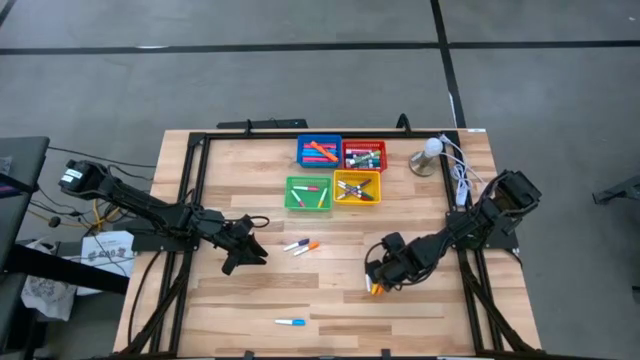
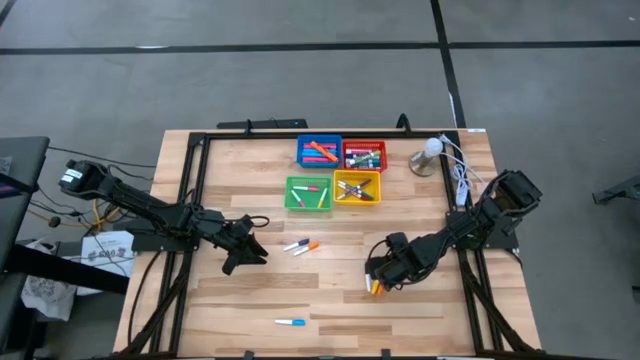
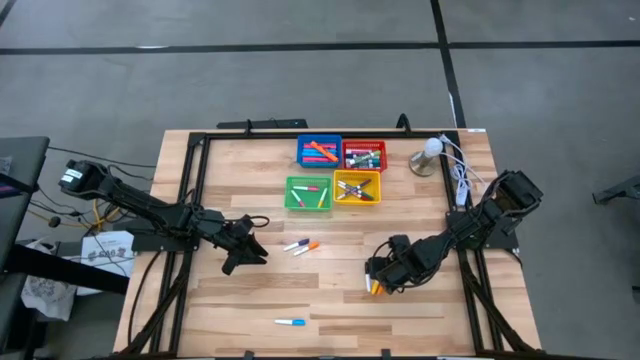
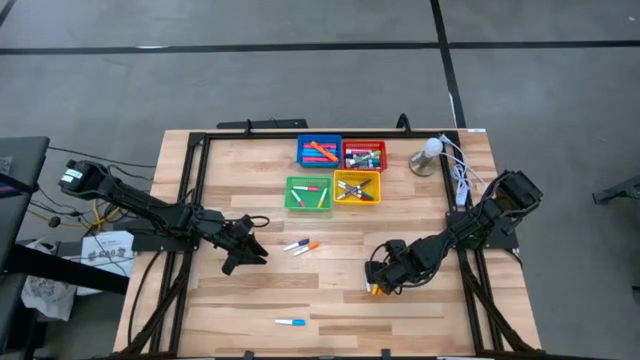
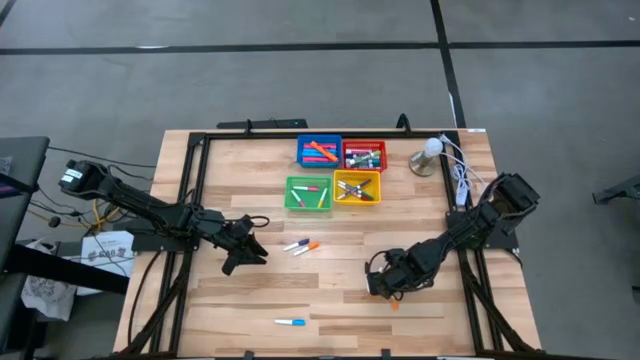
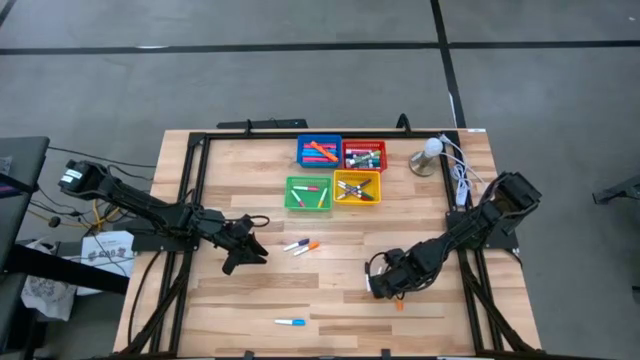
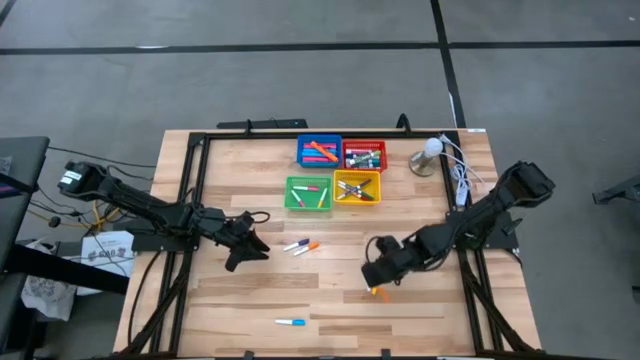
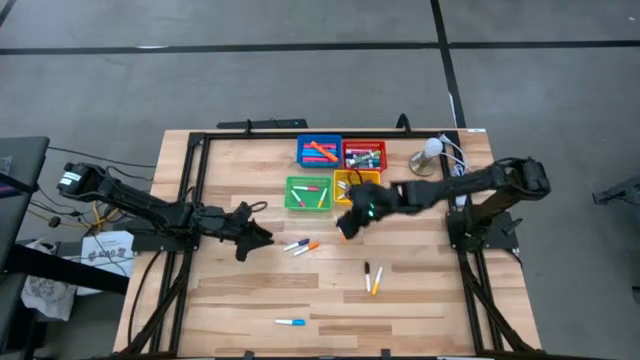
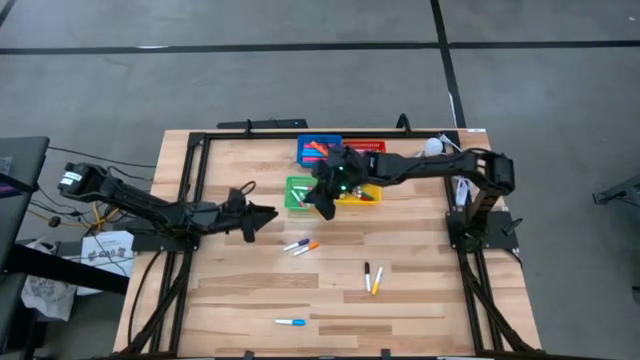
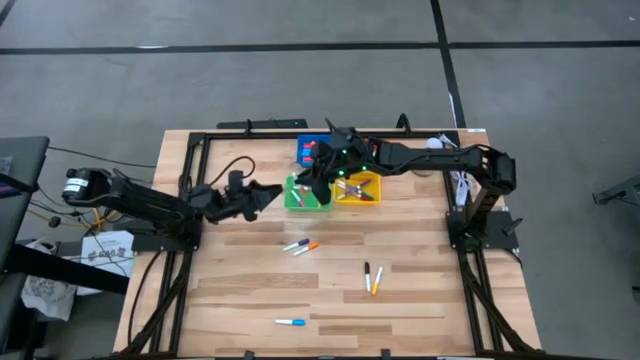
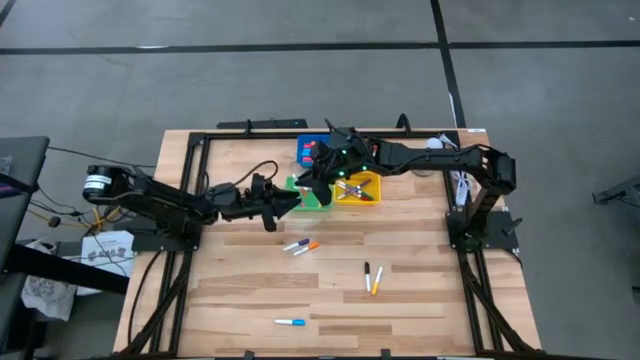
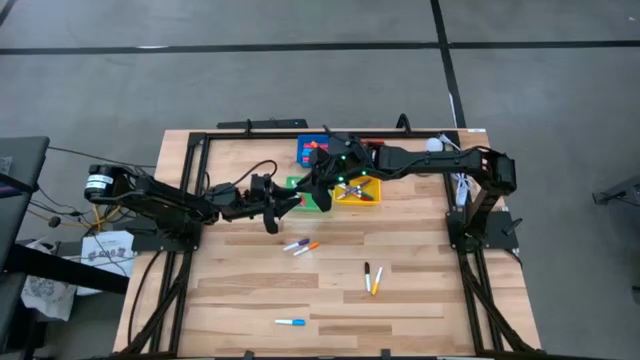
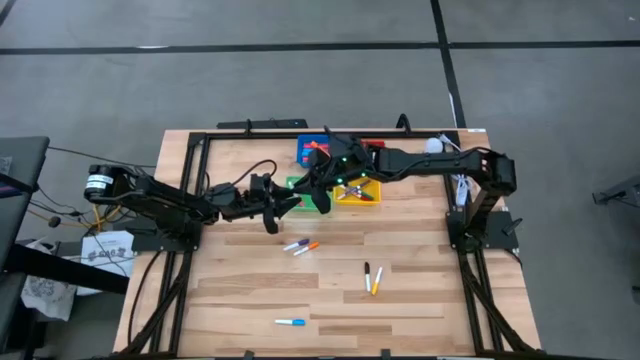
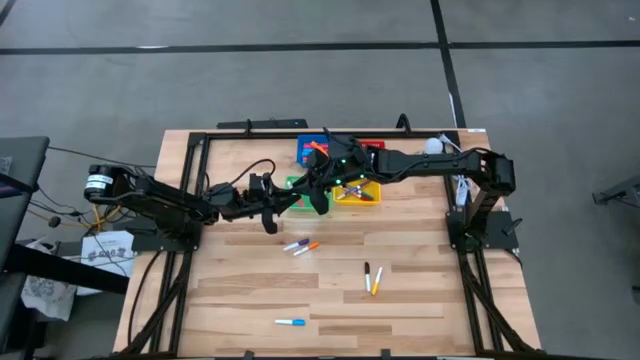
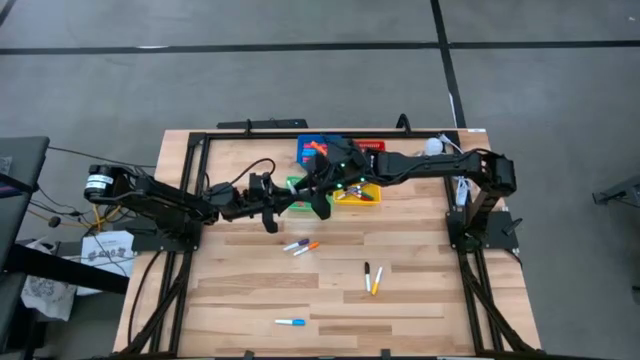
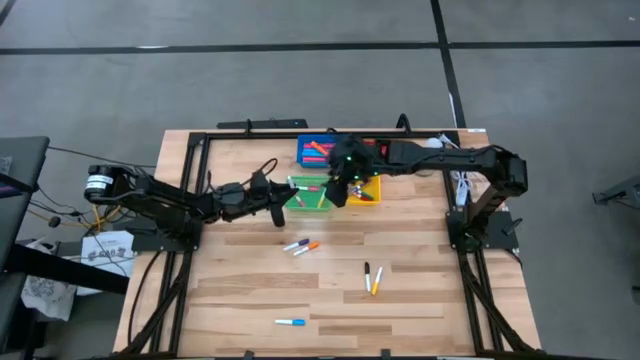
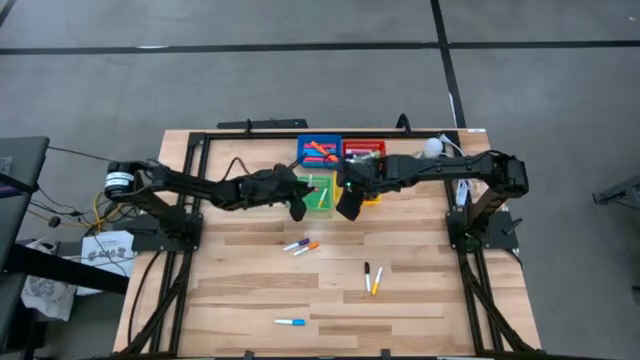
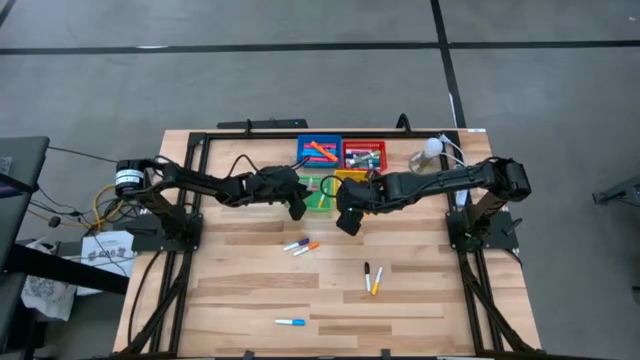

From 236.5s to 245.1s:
Task: Pick & Place Markers
Put the orange mini marker into the green bin

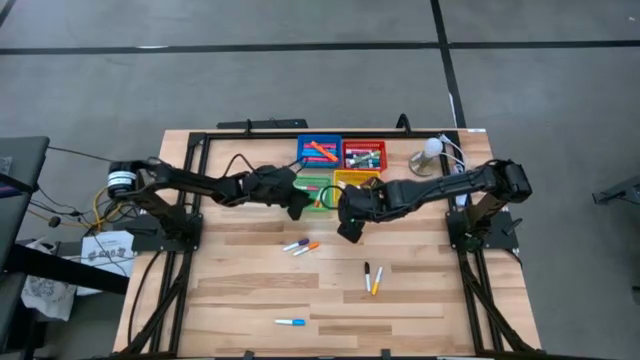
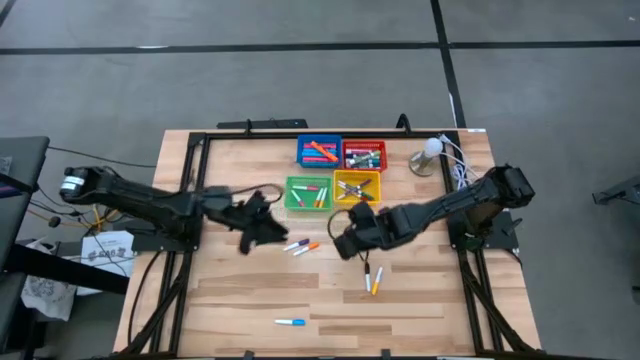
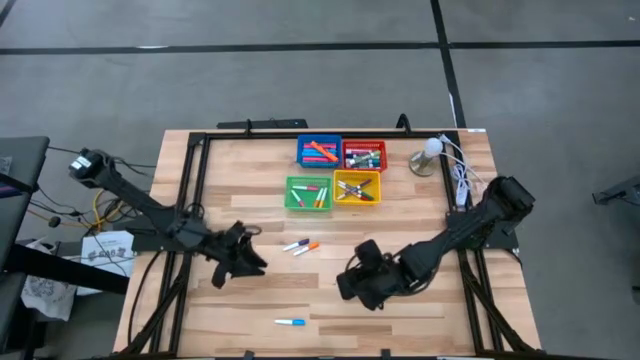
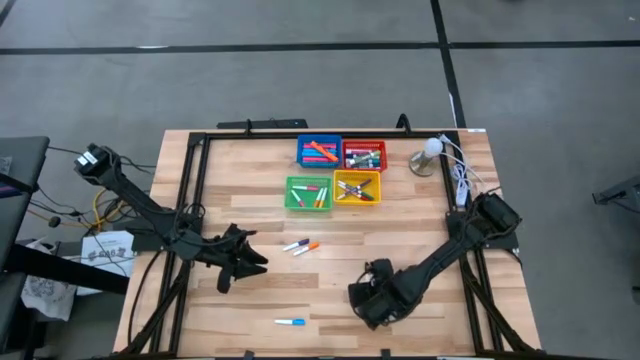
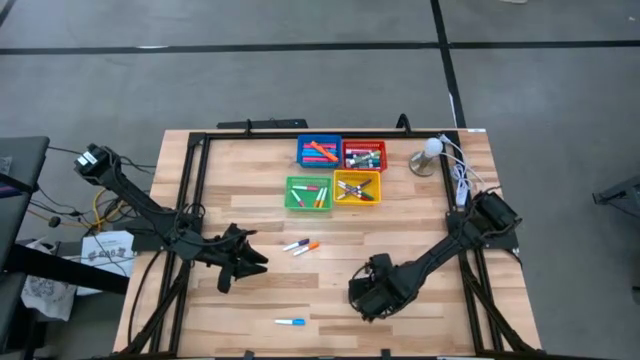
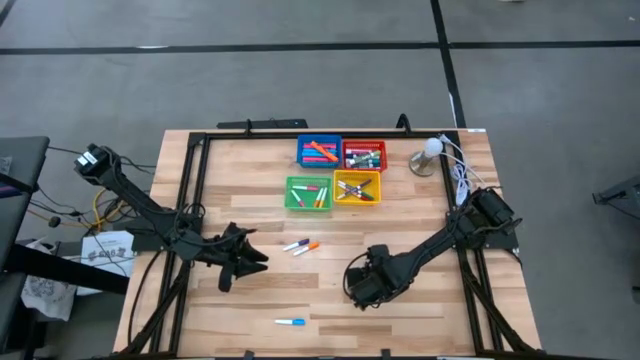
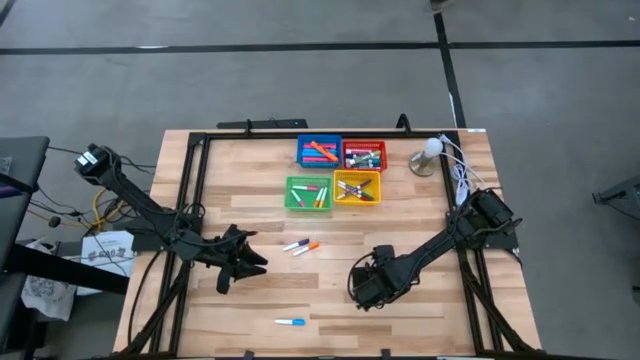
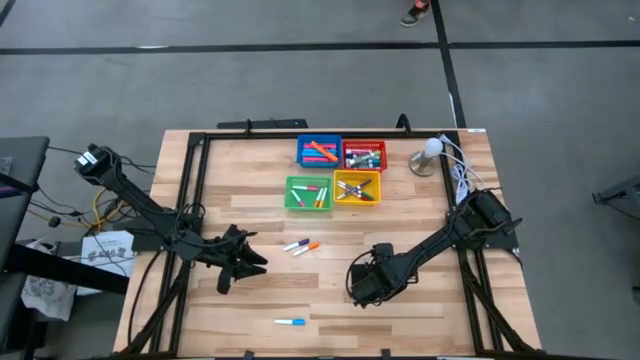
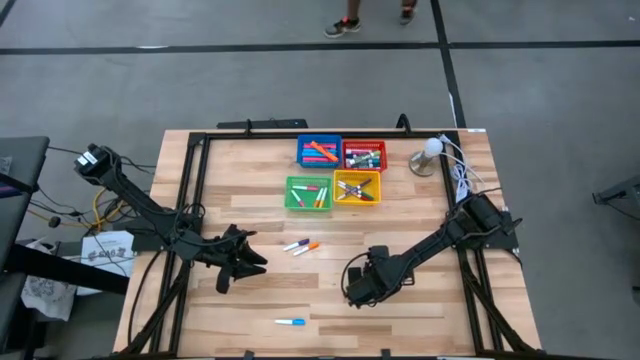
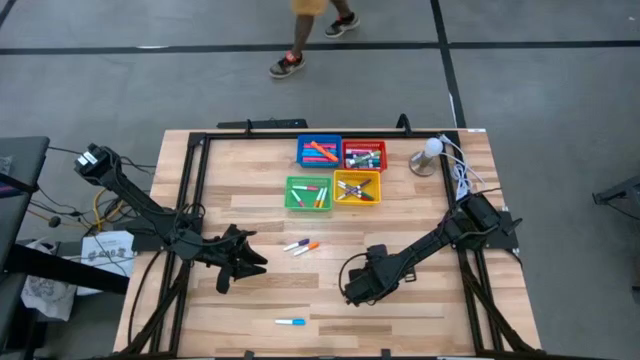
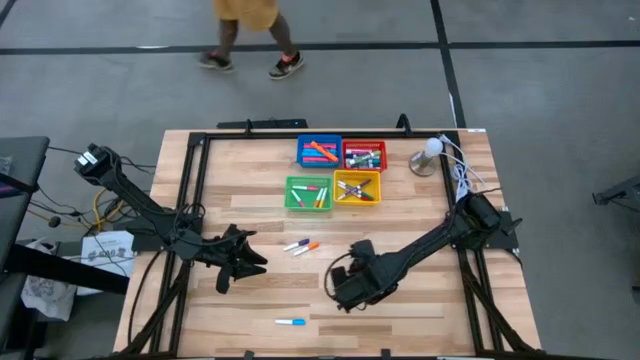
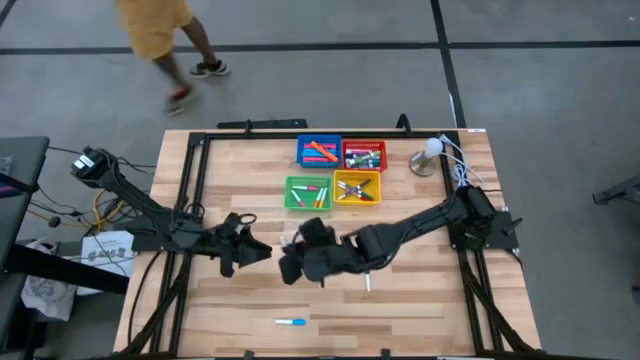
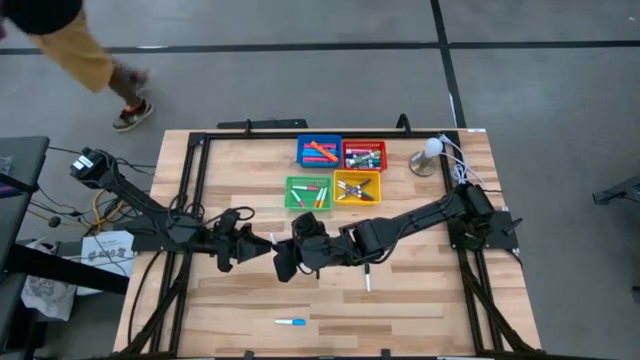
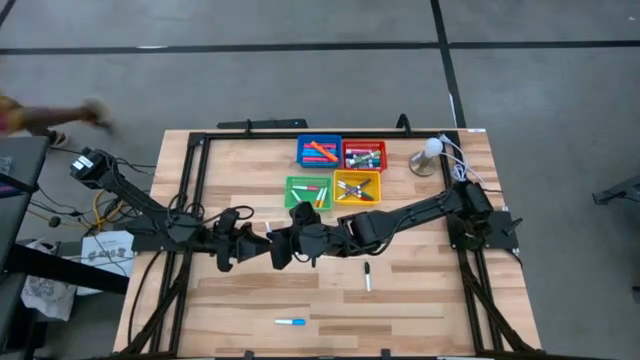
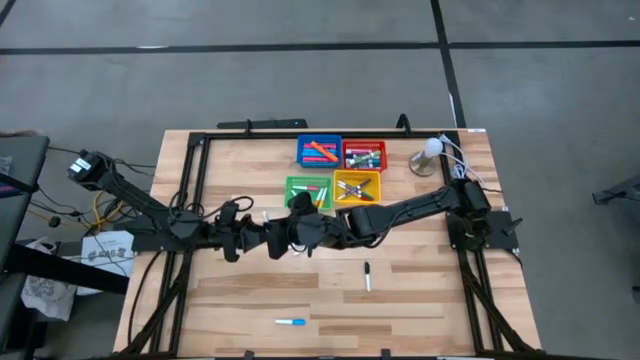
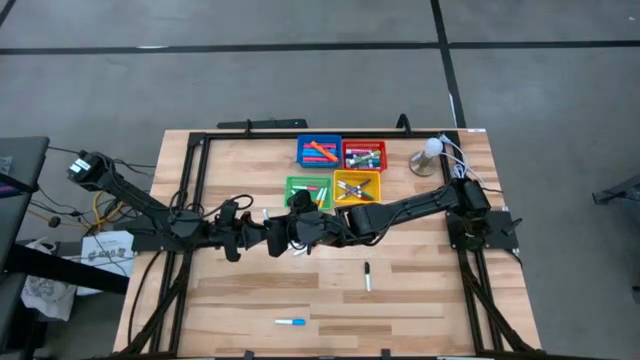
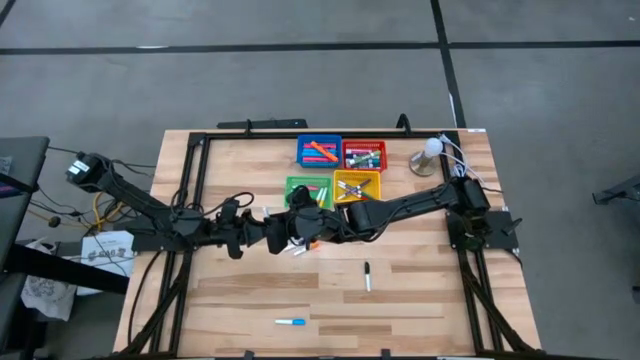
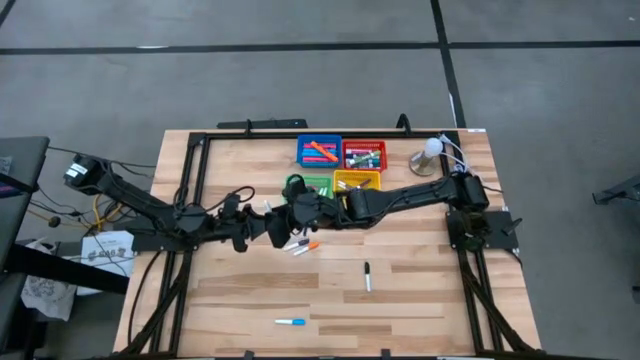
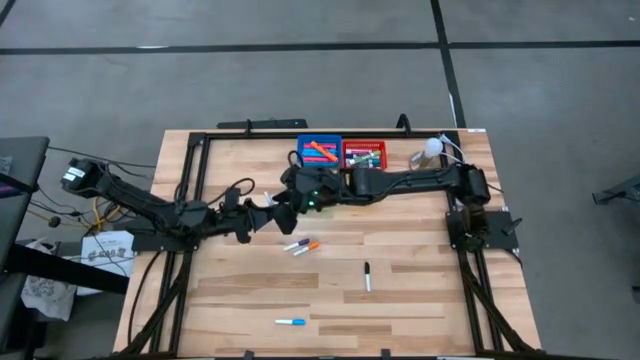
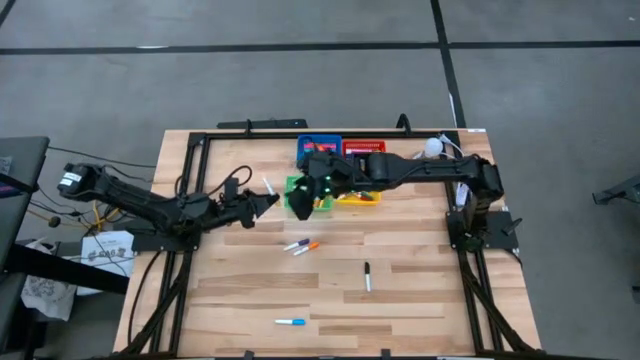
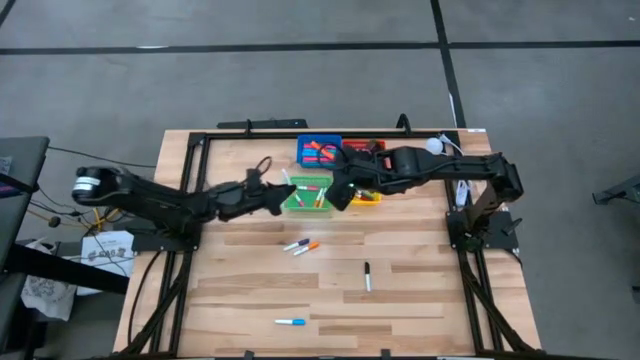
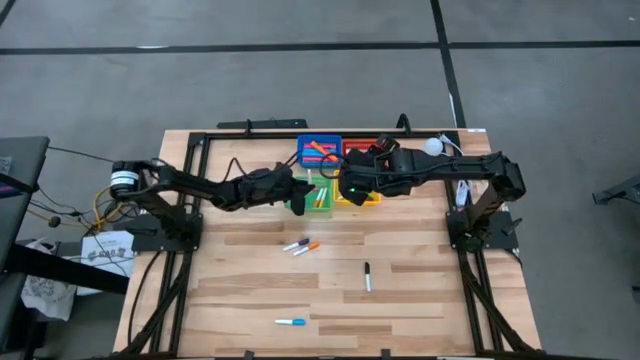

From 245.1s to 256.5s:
Put the yellow mini marker into the green bin
